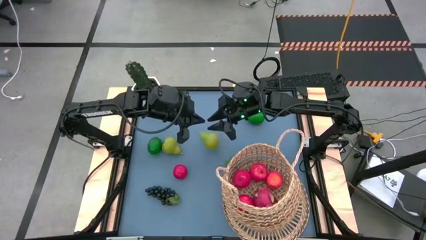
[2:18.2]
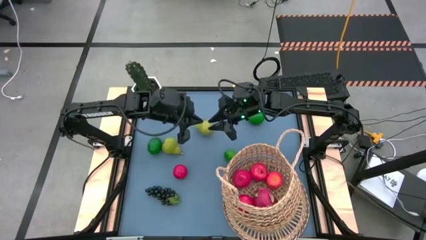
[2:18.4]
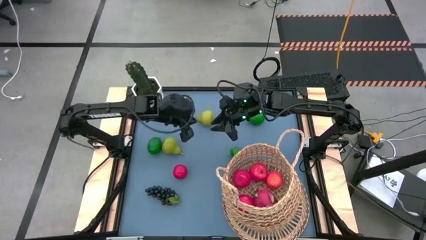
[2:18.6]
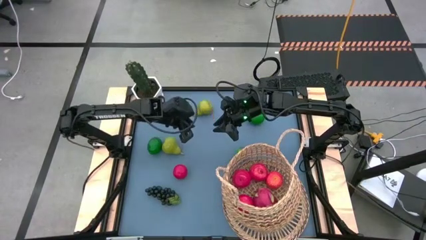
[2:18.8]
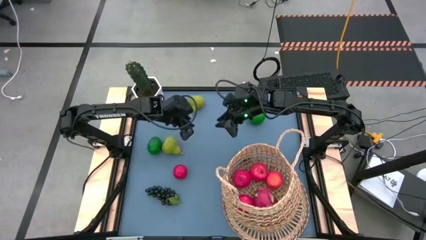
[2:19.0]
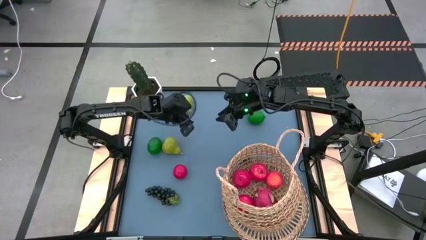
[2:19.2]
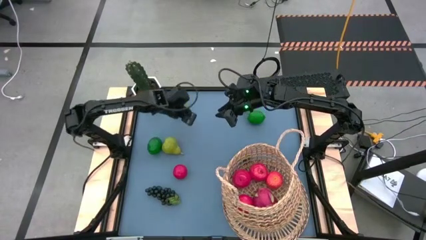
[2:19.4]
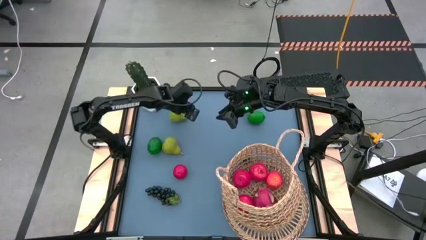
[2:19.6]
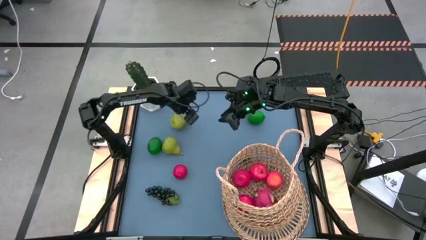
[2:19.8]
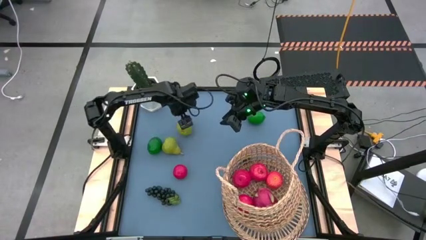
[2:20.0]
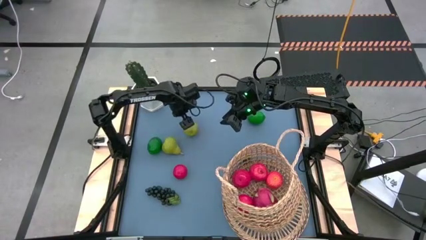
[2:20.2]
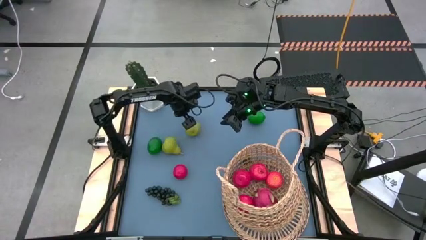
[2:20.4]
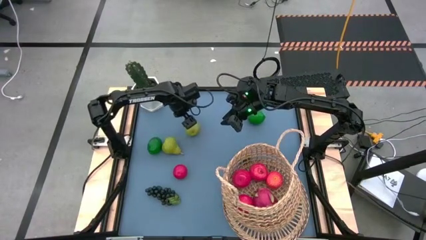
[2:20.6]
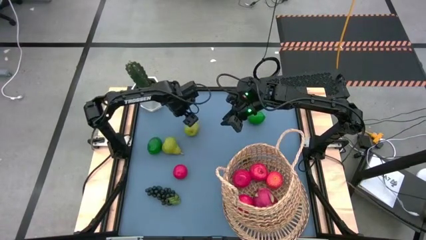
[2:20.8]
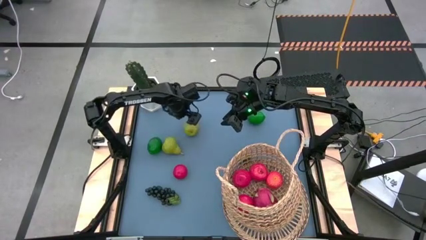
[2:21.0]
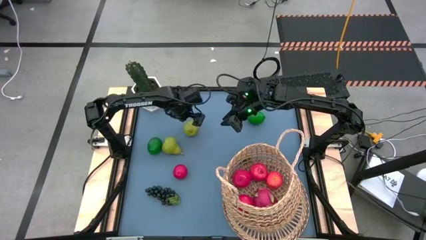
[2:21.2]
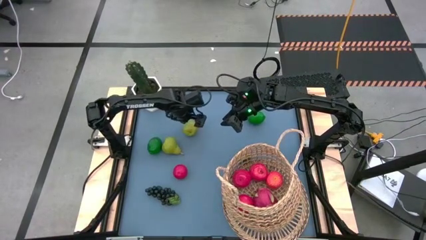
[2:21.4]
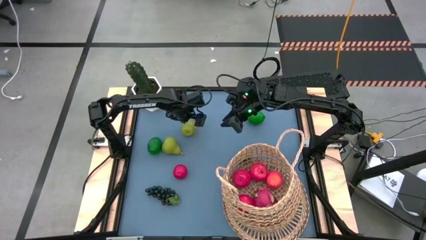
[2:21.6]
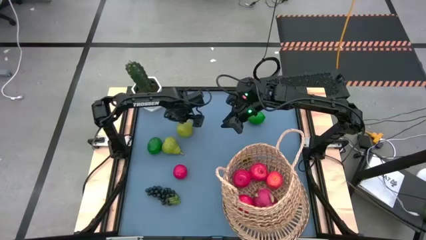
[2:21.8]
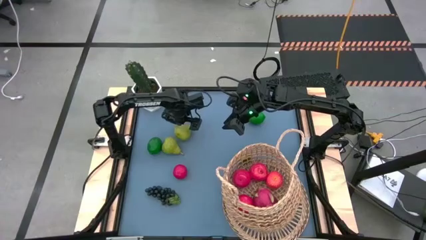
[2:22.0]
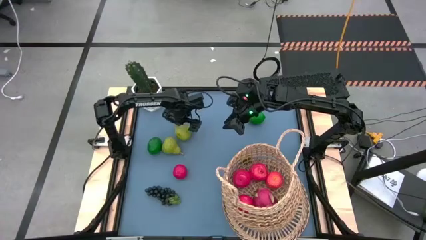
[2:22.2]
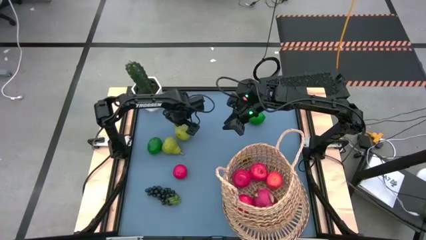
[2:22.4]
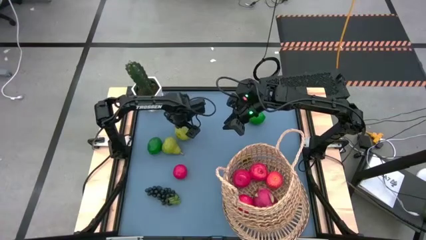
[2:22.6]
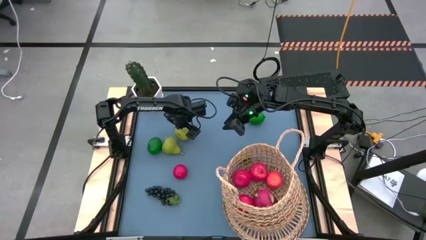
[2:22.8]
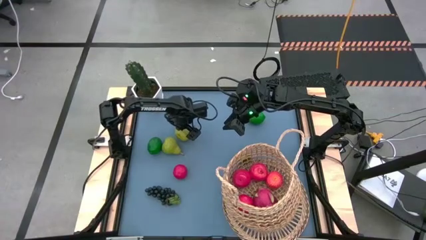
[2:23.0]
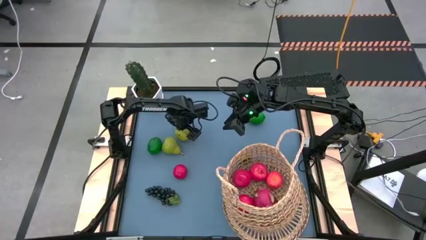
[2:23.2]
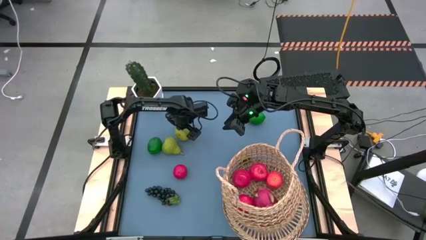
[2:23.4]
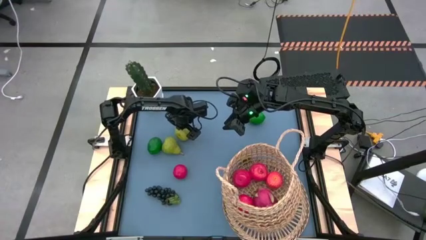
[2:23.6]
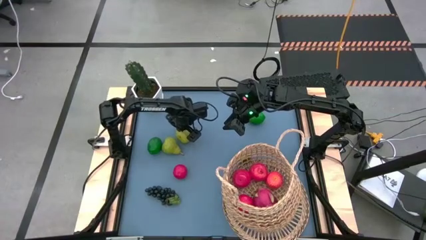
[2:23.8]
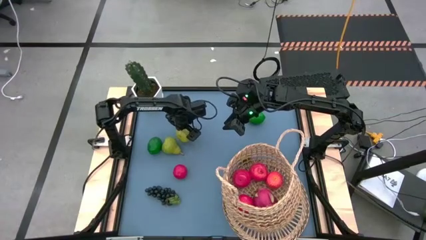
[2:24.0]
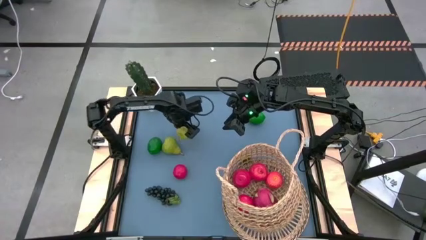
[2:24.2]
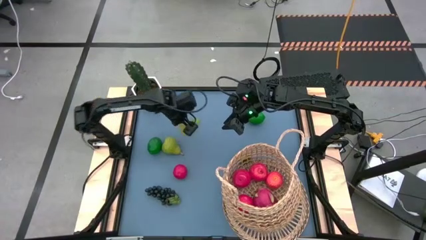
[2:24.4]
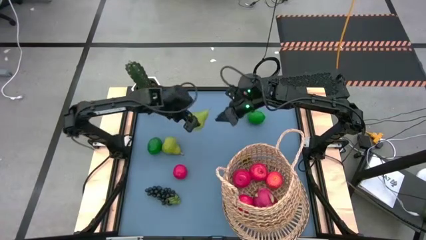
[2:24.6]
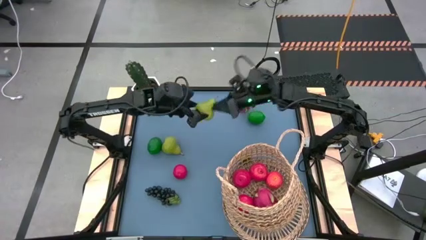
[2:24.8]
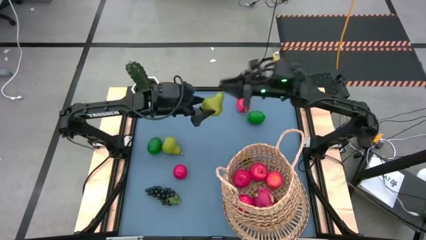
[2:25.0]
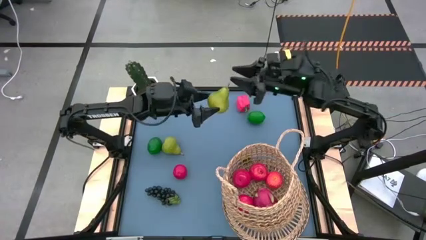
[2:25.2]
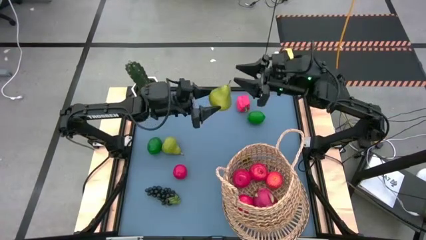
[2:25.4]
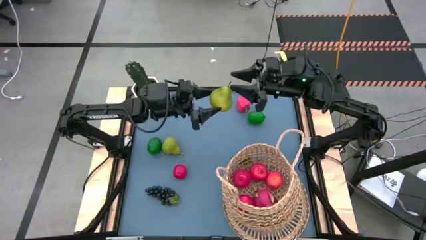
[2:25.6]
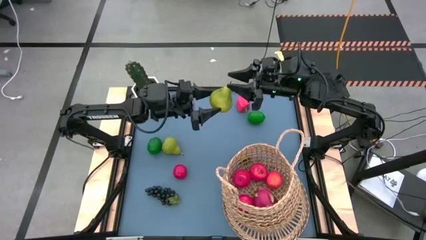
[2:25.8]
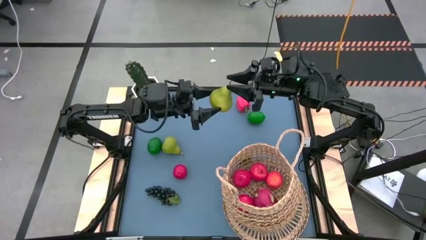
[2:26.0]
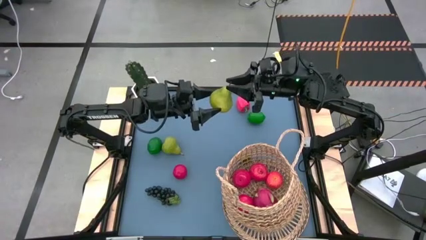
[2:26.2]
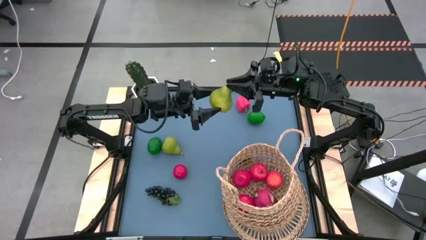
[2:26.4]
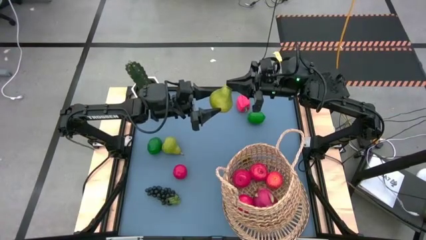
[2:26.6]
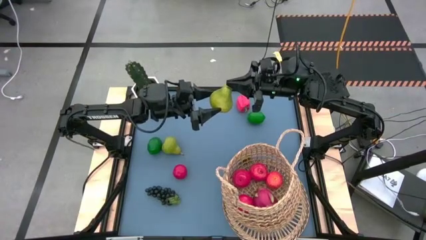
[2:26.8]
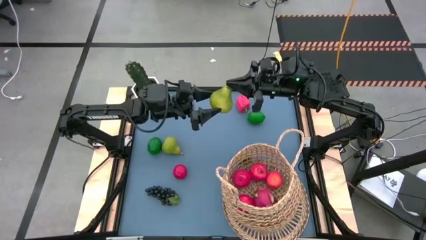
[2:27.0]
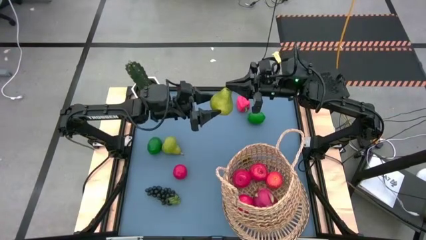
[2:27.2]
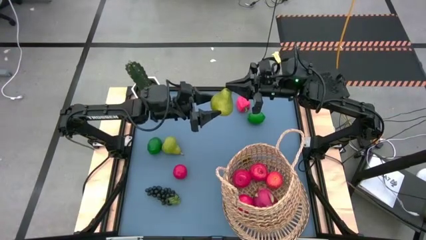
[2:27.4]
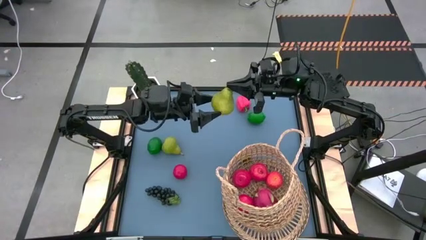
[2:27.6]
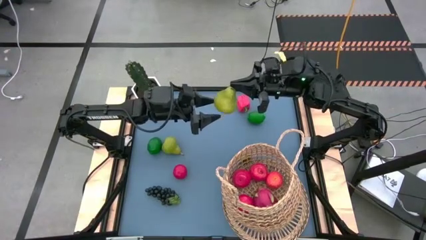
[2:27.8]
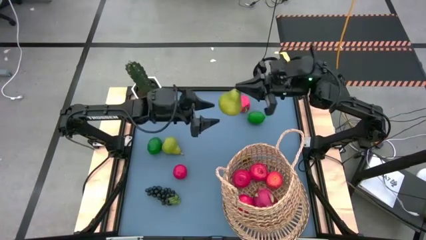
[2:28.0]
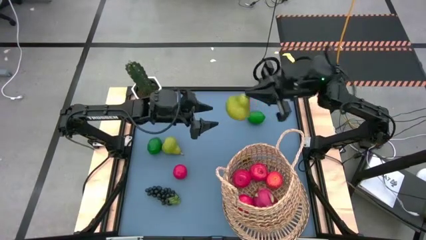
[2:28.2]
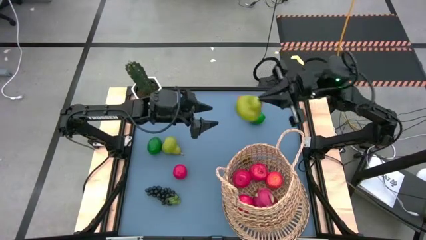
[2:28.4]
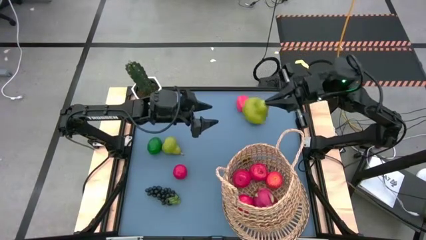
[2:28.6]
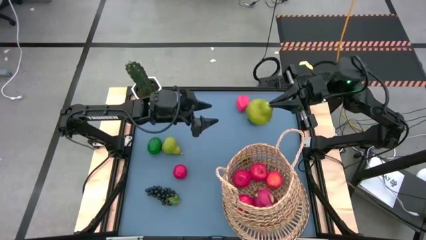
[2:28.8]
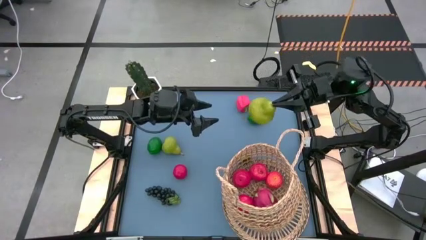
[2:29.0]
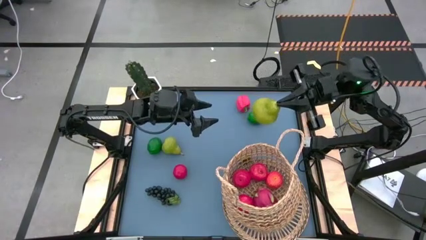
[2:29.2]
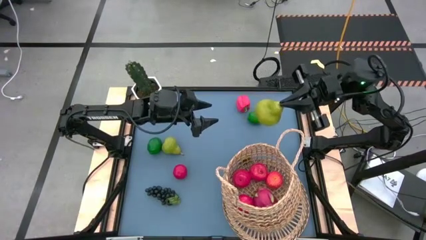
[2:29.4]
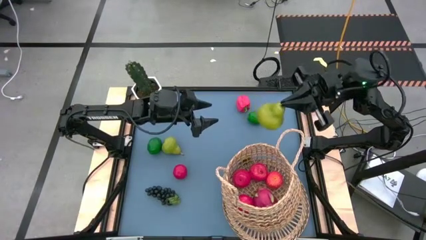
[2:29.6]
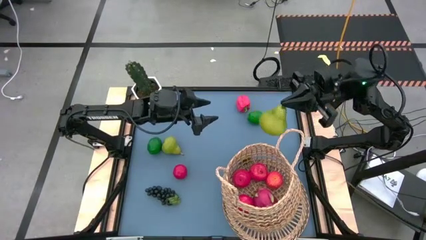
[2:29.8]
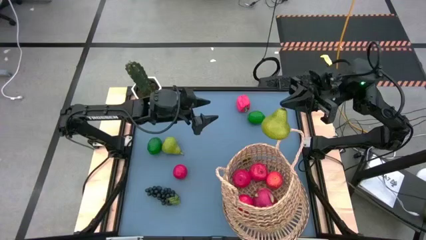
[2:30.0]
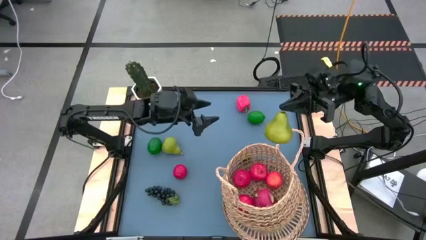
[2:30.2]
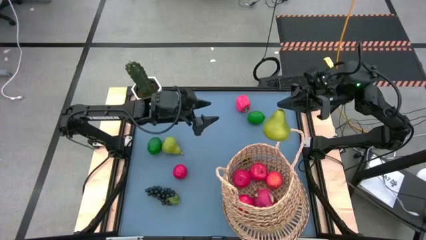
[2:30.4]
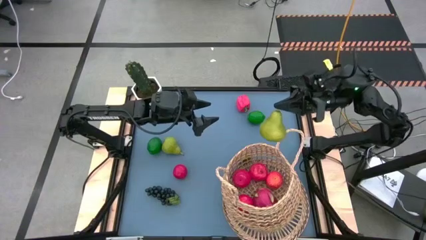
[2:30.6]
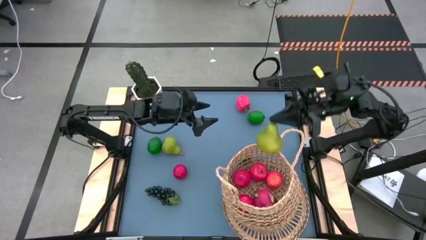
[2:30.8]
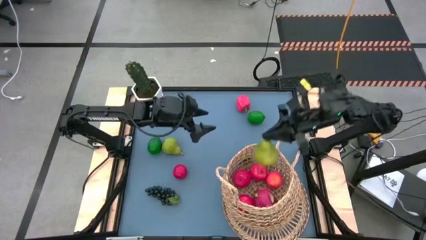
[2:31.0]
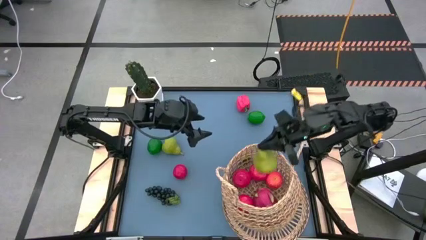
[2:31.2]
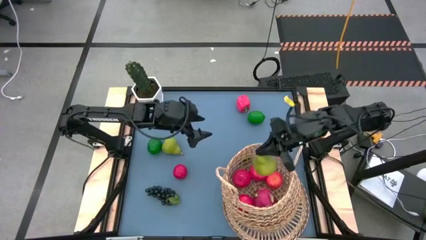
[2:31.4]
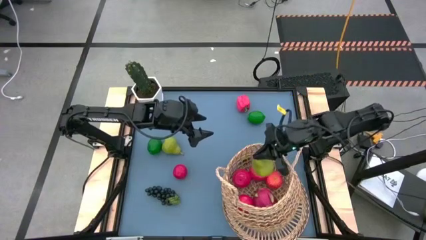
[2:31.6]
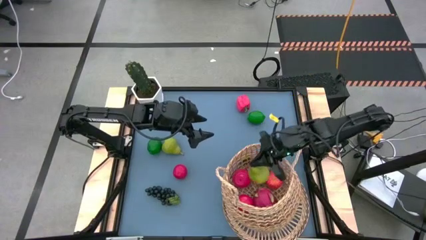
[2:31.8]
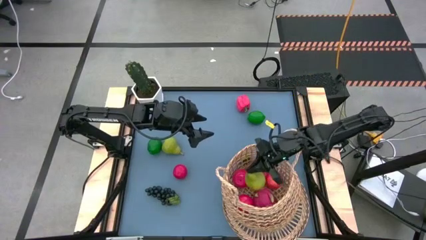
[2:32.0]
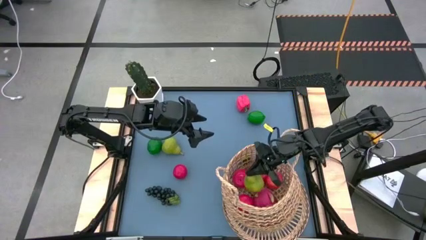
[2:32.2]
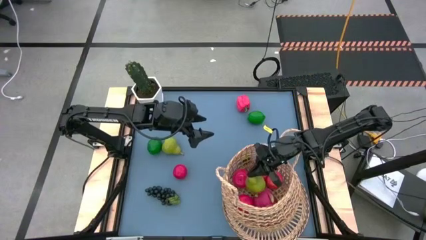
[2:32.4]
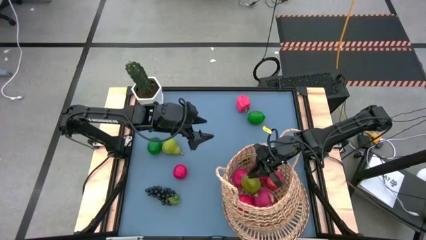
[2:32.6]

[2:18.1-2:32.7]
Task: Build produce basket
Put the green pear into the brown basket

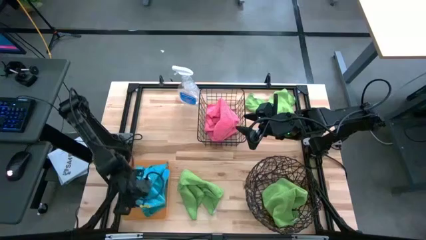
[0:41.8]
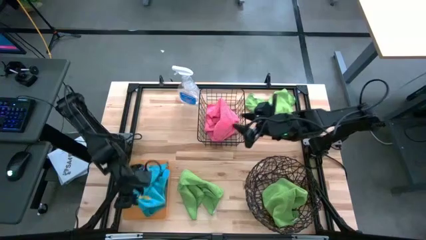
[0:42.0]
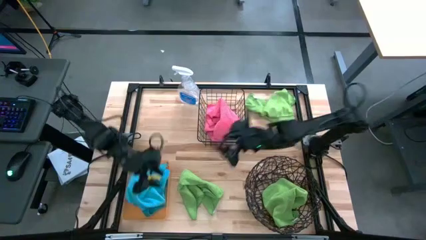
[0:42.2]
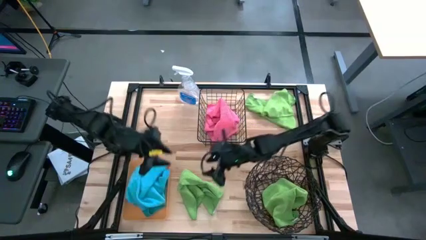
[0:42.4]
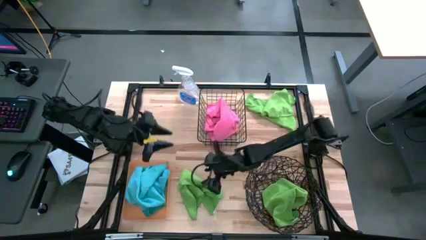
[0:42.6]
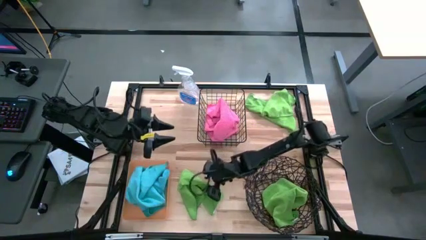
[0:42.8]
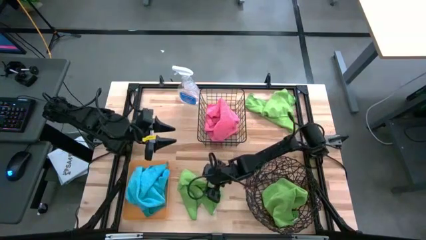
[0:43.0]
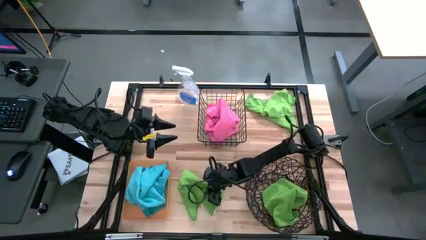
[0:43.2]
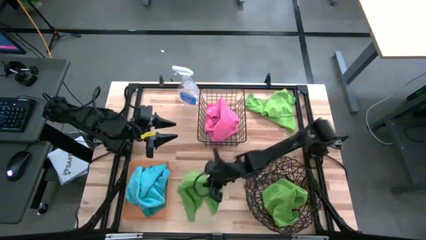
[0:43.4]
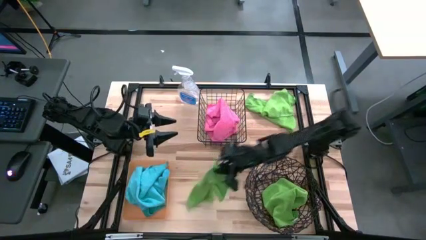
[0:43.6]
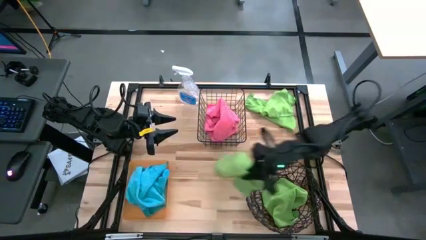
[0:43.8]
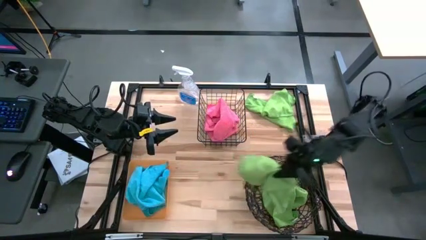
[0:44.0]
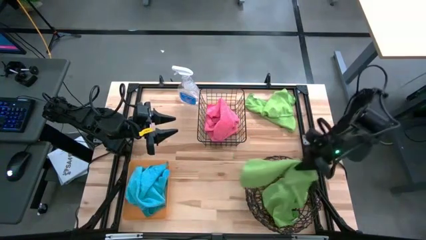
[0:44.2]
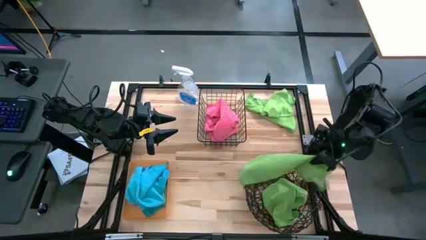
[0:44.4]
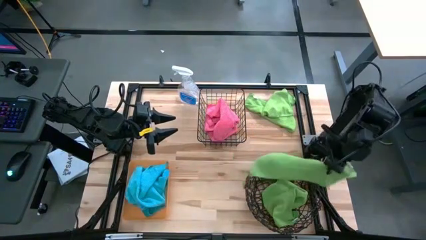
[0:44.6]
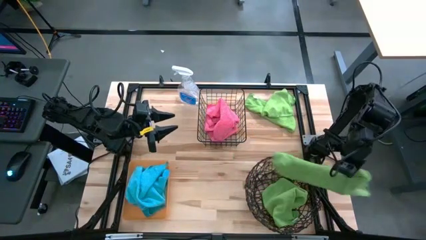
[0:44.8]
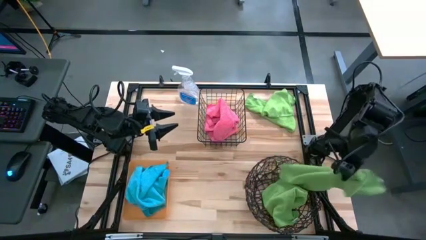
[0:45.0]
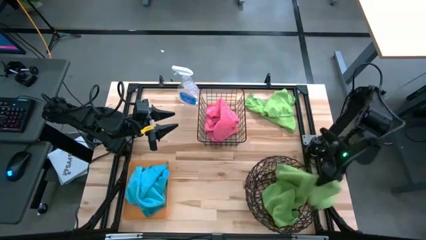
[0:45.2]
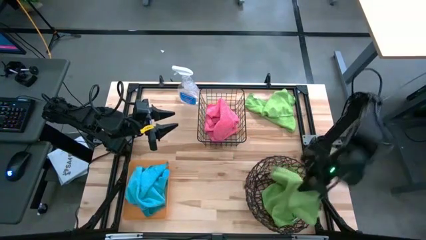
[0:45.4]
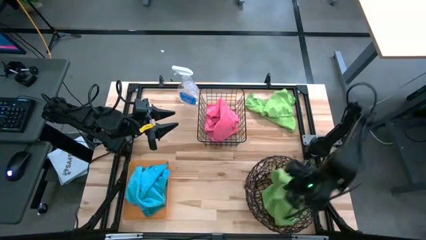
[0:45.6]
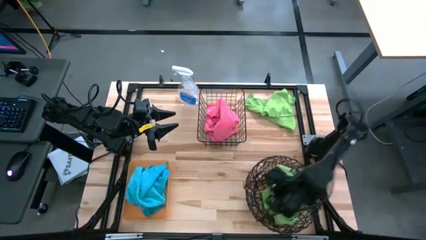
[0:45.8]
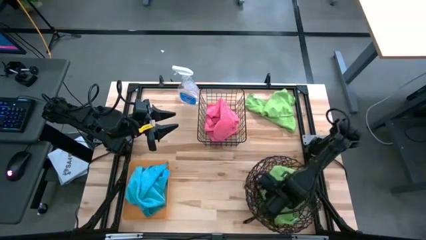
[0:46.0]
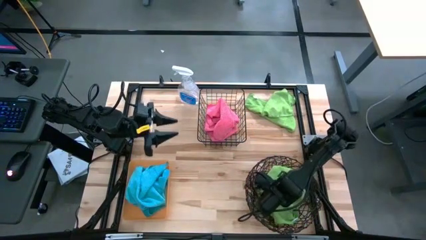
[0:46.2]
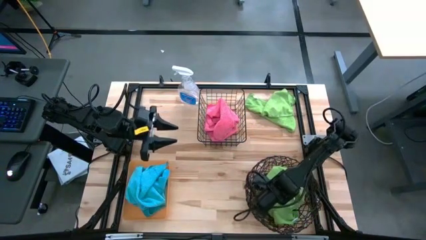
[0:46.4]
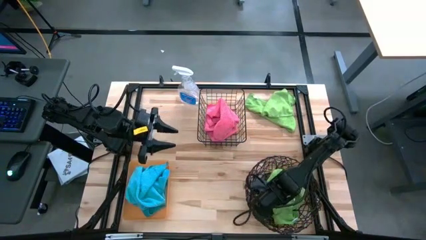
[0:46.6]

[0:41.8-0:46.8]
Task: Sort microfiber towel by color & place in baskets
Put the green towel into the black woven basket
